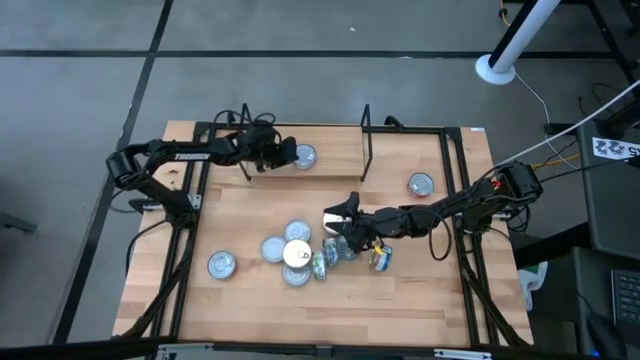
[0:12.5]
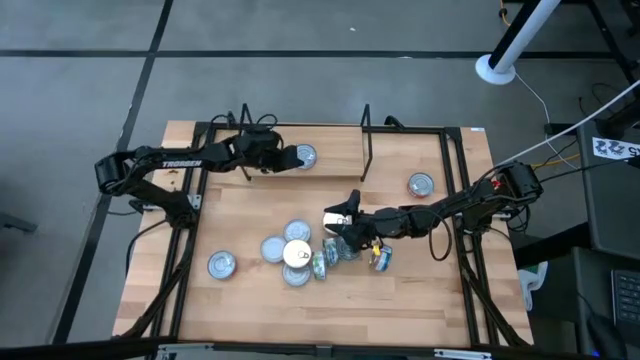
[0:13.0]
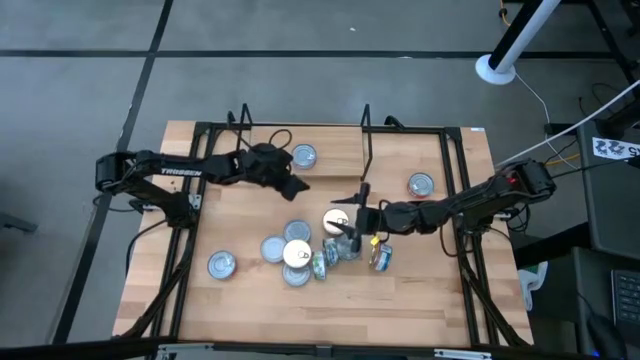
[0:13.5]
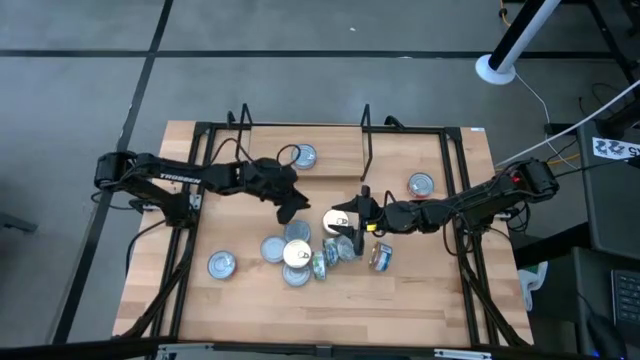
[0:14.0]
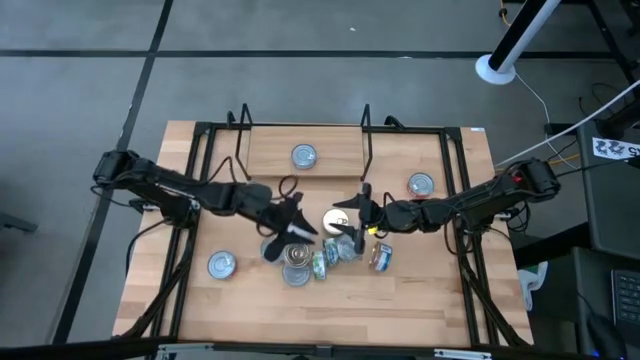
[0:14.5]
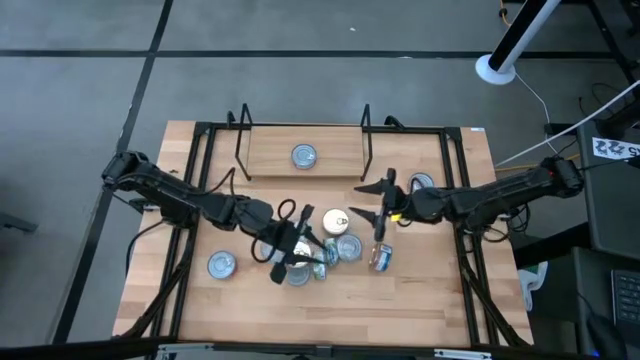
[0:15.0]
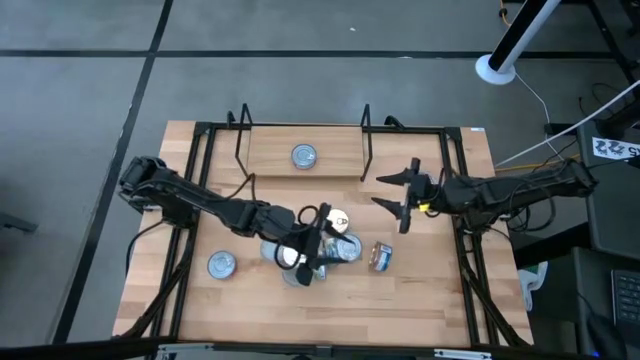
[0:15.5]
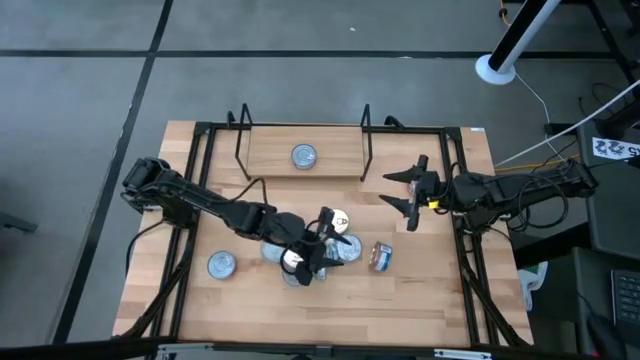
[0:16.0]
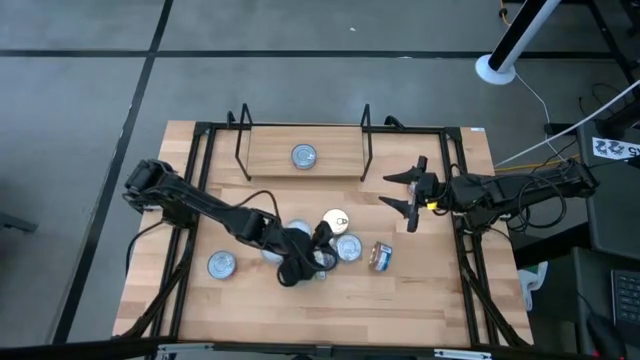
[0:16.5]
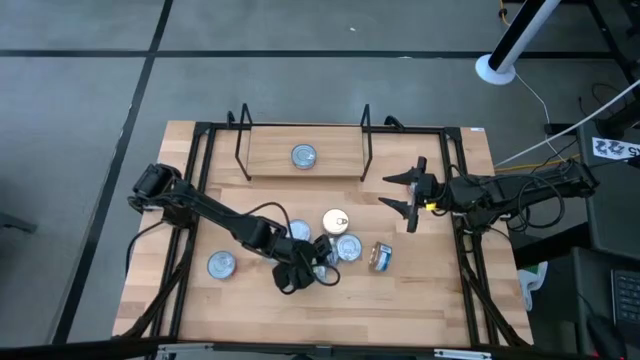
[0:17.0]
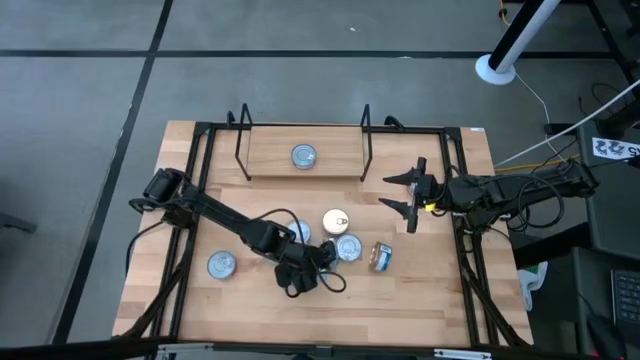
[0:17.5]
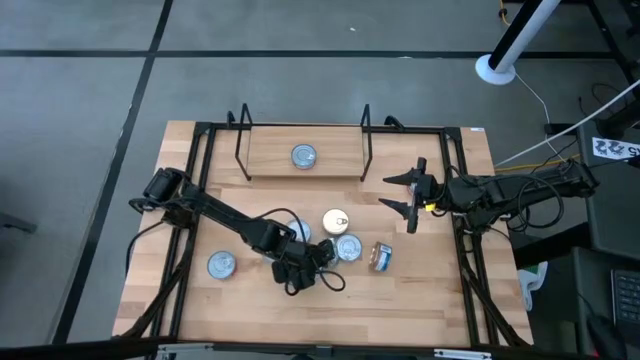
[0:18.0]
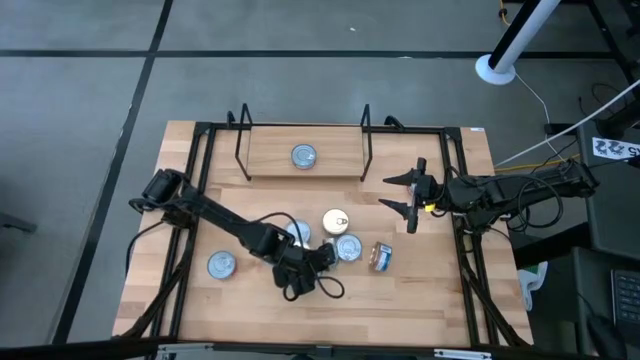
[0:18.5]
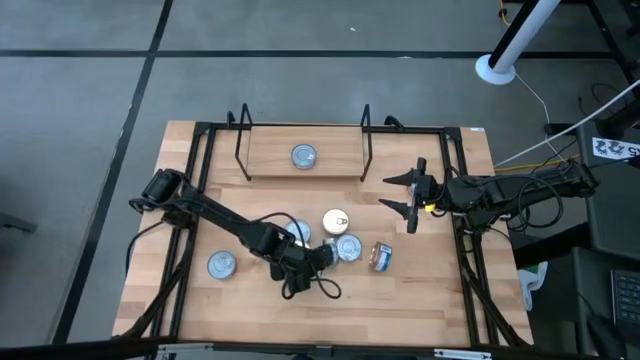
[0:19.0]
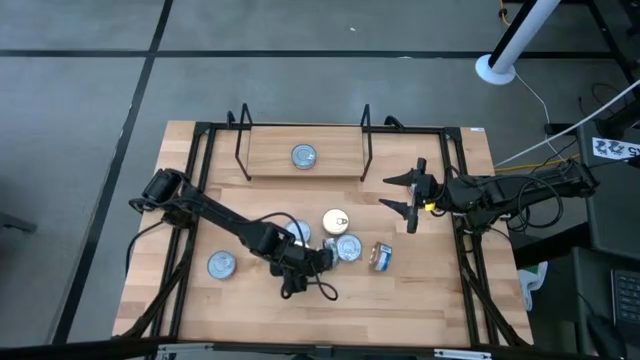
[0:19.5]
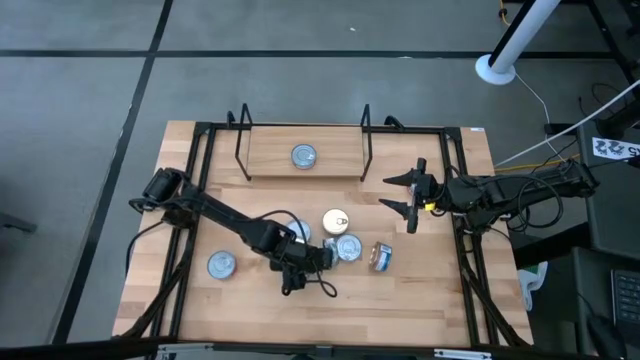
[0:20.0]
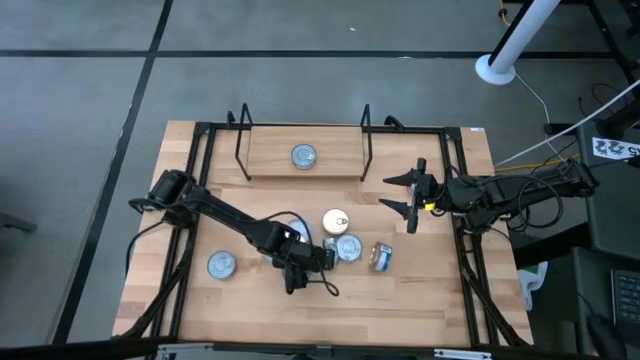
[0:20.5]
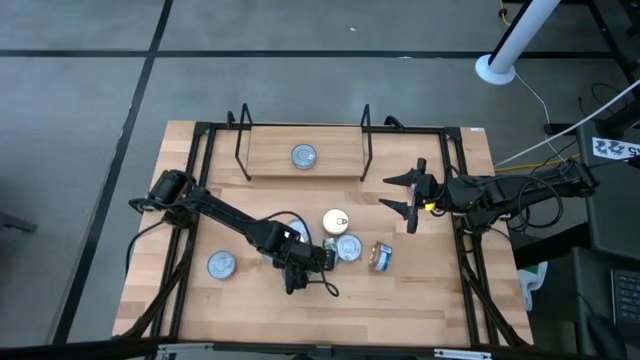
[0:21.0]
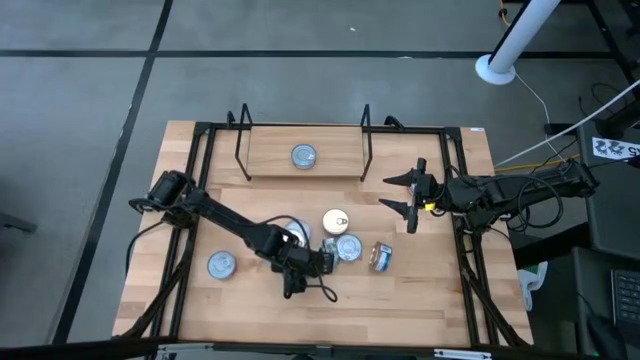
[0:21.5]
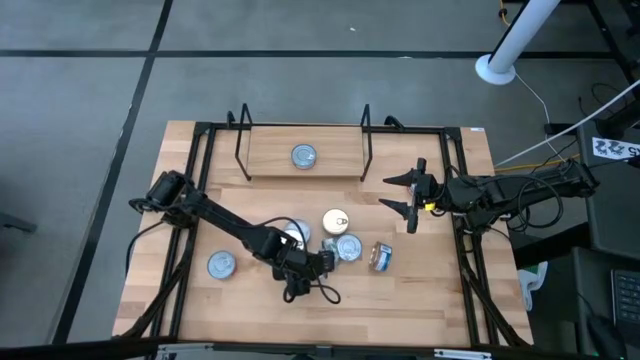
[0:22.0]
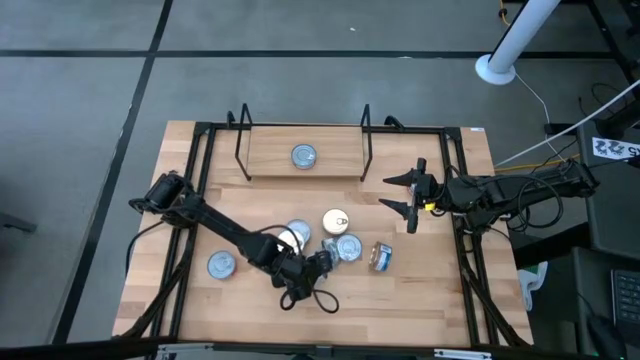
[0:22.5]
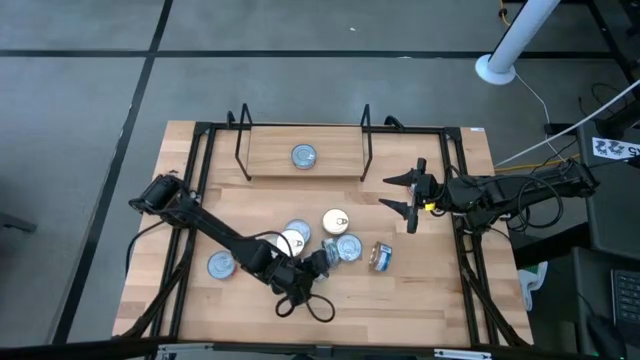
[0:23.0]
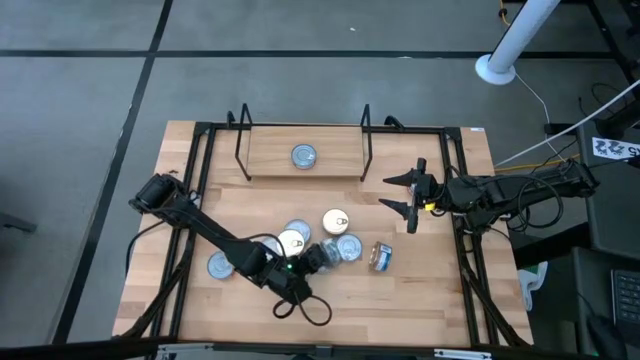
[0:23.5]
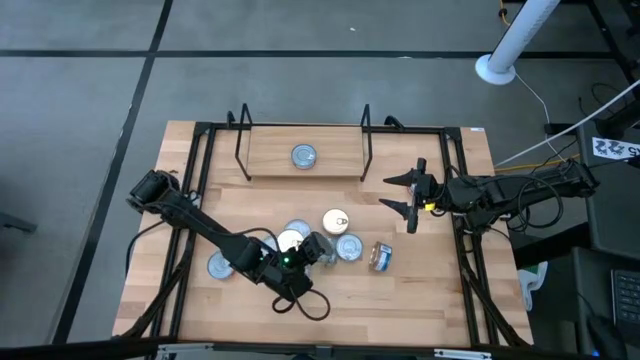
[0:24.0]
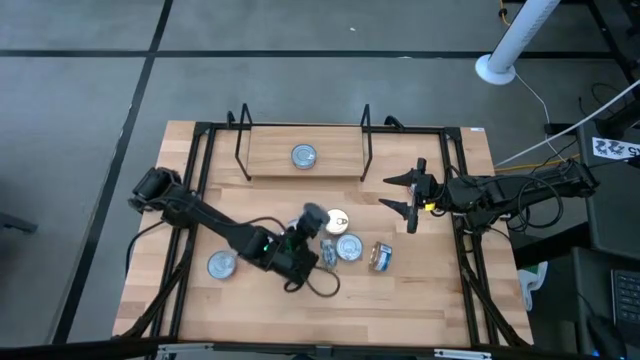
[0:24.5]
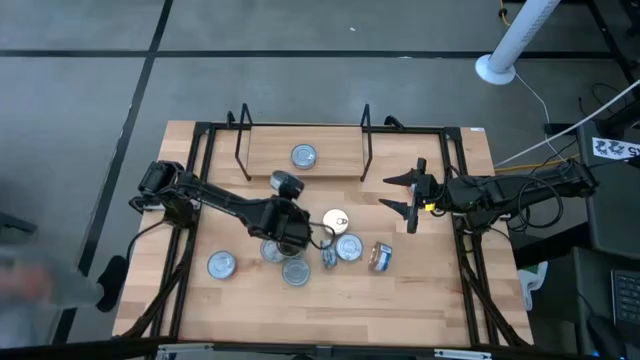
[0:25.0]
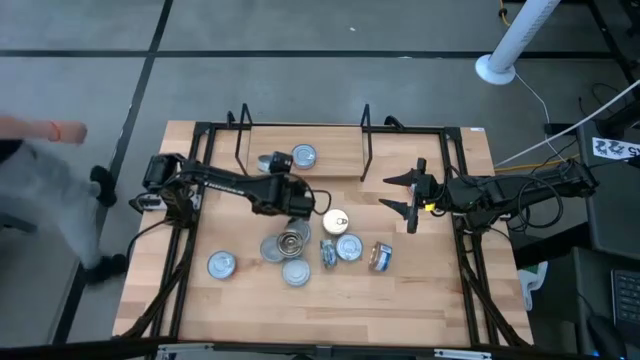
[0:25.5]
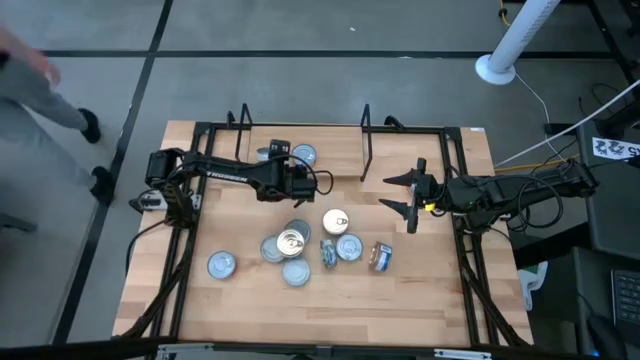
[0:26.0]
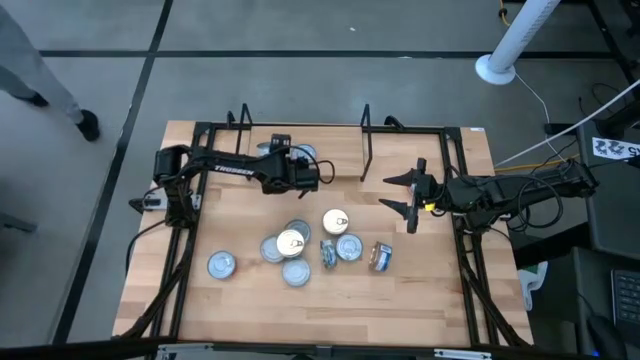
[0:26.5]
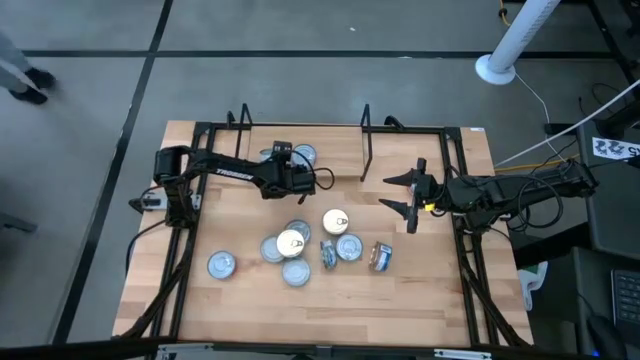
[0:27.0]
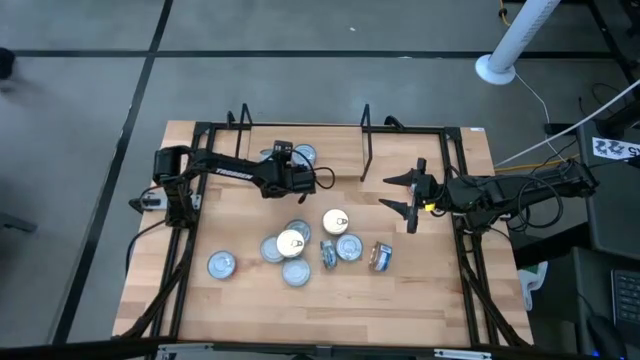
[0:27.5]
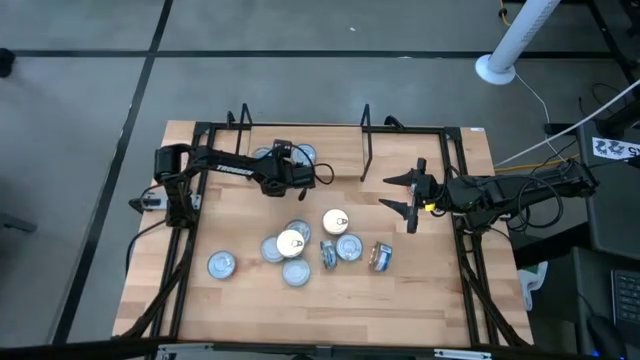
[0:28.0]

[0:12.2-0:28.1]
Task: Stack canned seafood by type on shelf
Put the green-white tuna can on the shelf

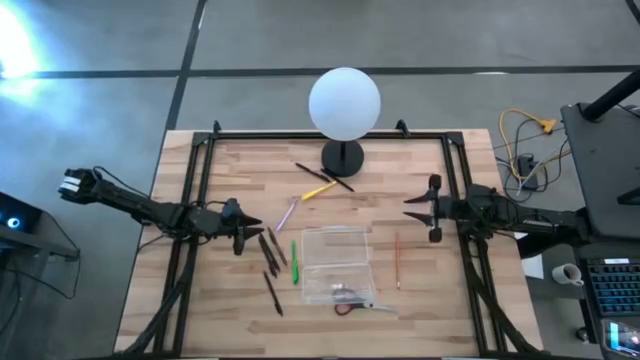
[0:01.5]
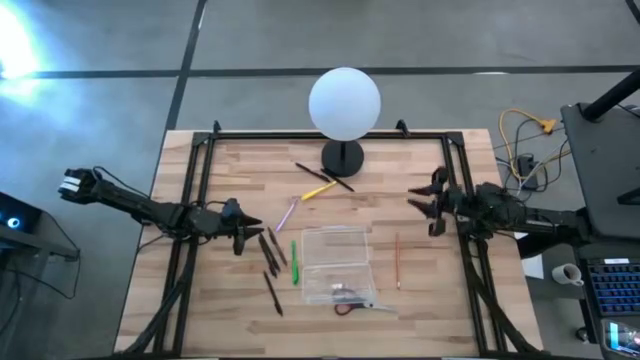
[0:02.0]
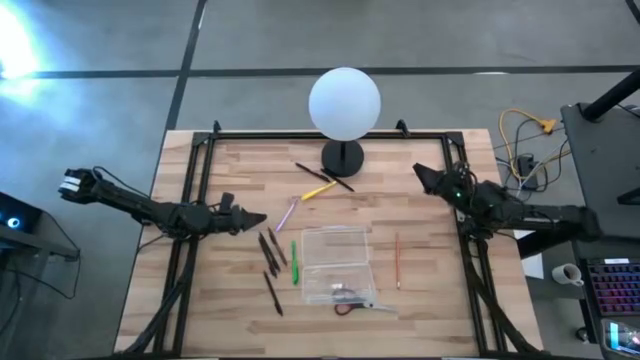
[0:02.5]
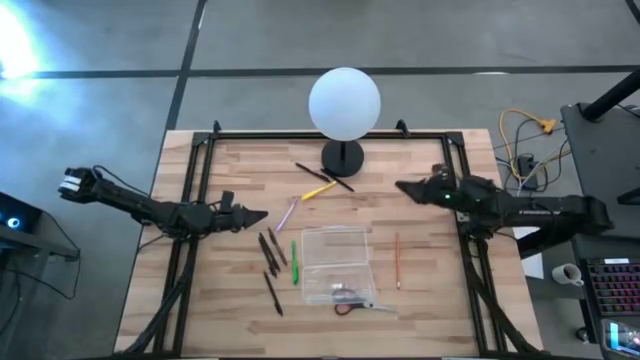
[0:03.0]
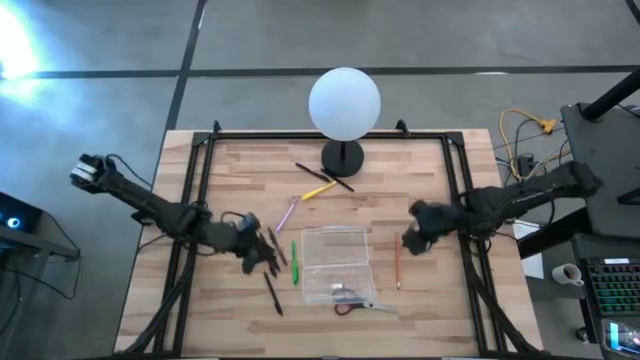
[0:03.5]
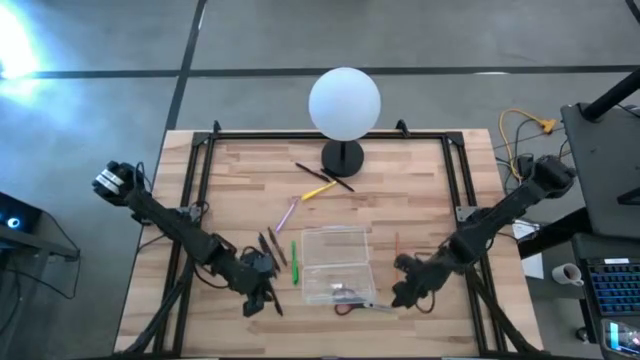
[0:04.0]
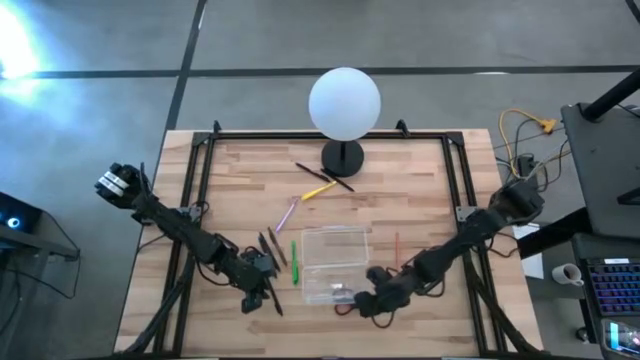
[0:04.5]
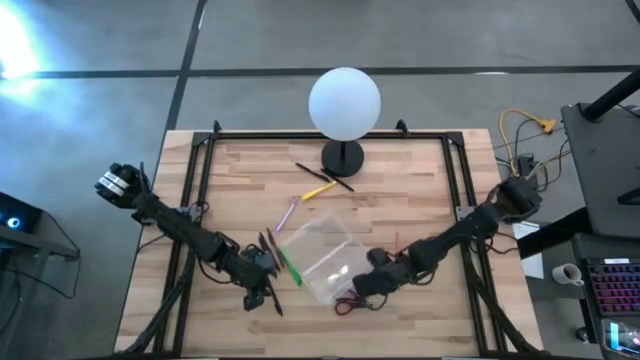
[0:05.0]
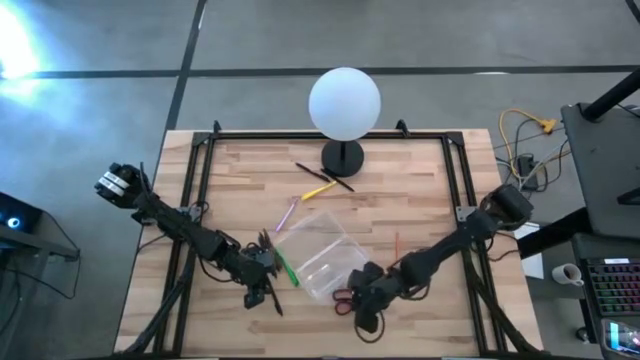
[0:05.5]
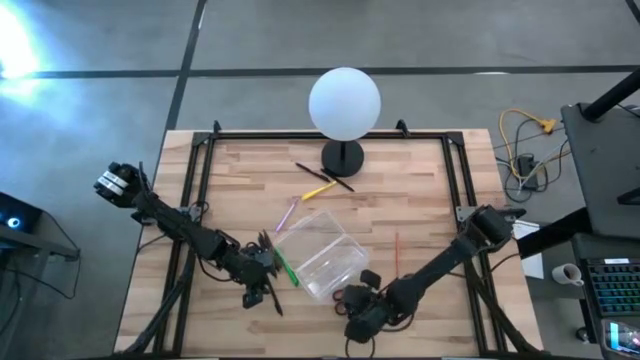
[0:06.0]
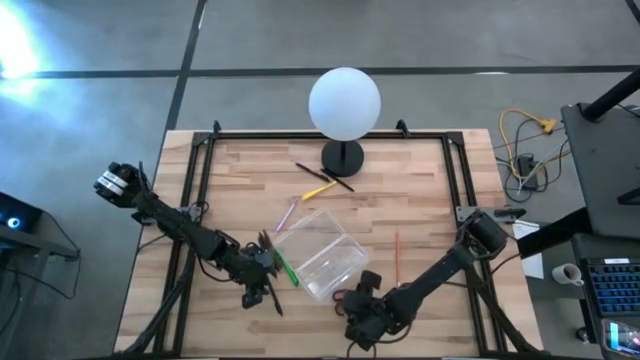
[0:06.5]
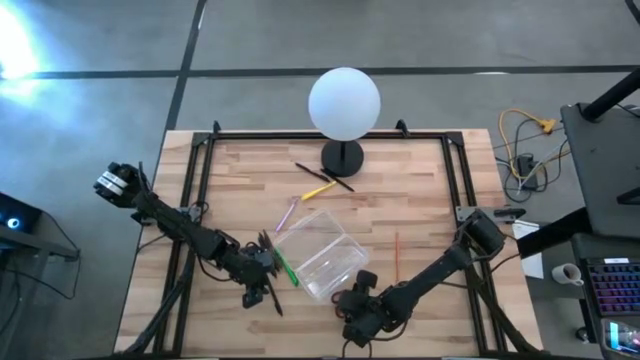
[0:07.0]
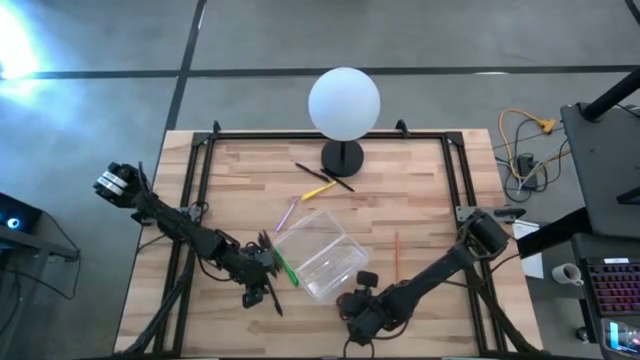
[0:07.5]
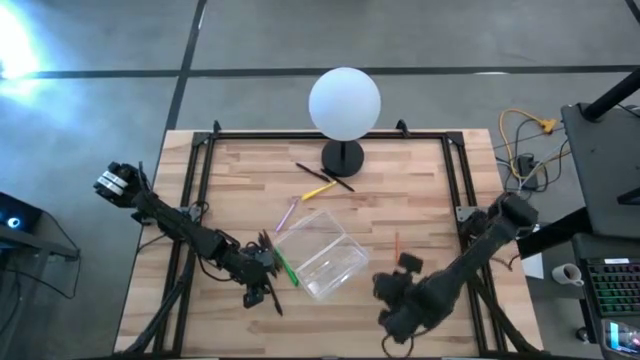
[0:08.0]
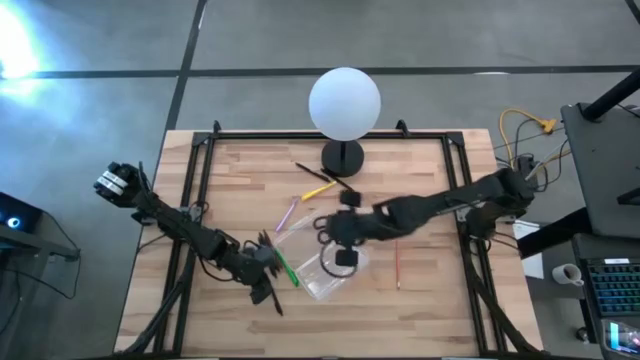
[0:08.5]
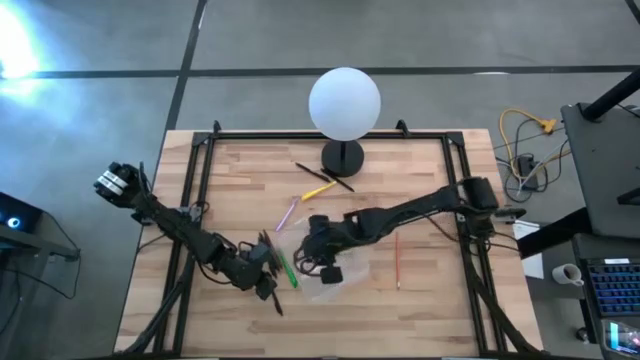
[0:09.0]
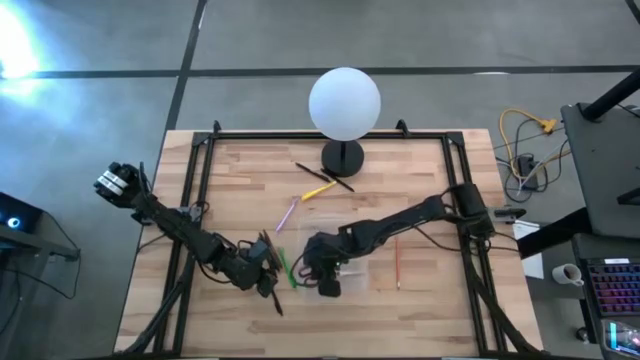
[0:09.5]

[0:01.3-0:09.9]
Task: Pick & place school supplies into a supply box
Put the black scissors into the transparent supply box
